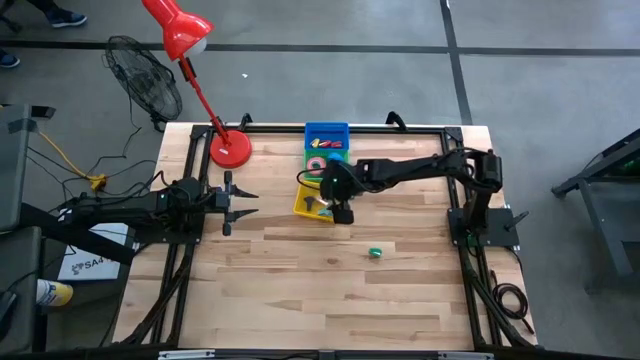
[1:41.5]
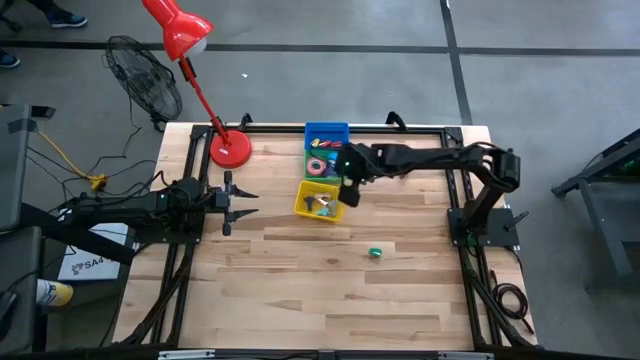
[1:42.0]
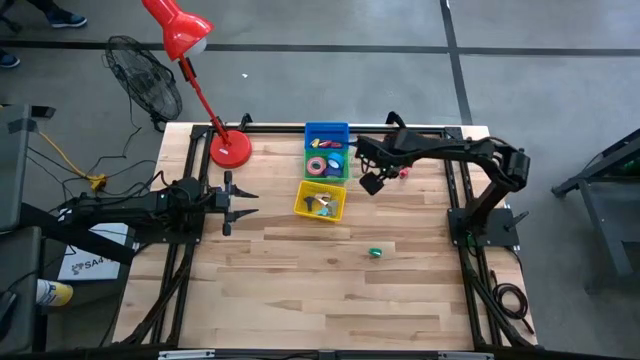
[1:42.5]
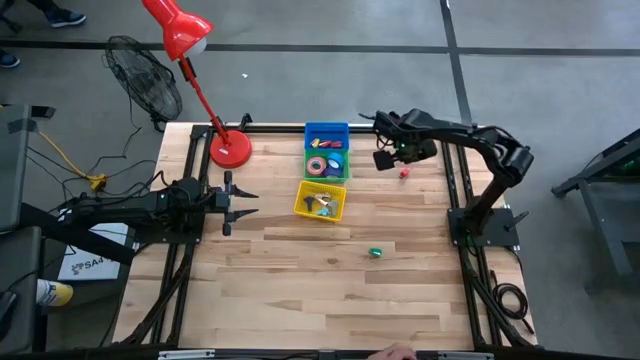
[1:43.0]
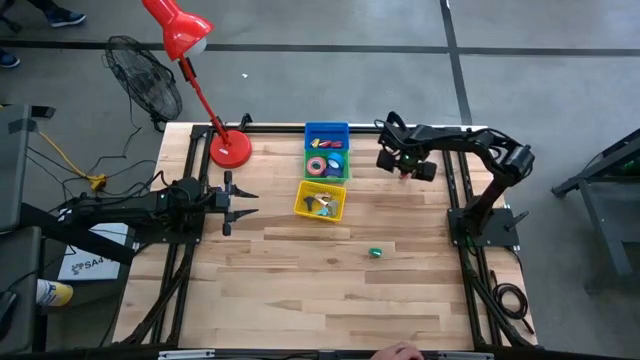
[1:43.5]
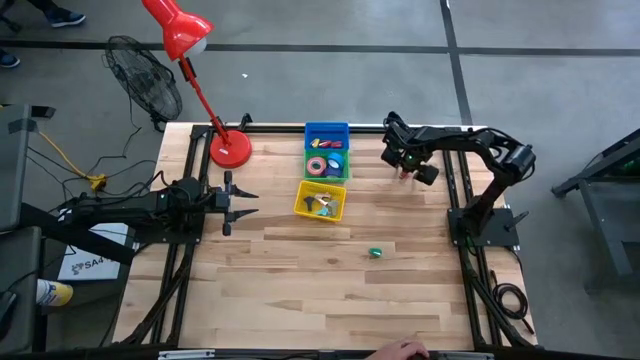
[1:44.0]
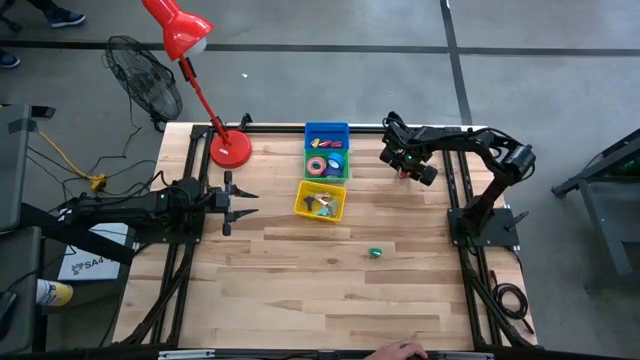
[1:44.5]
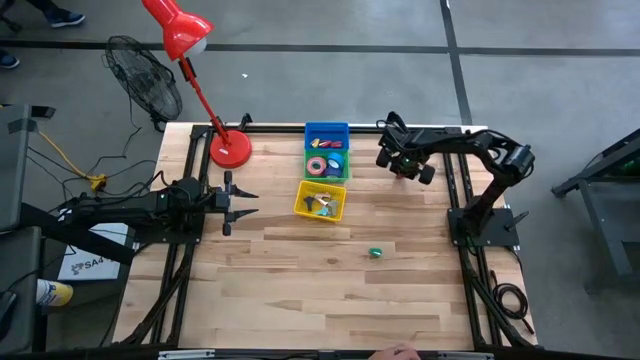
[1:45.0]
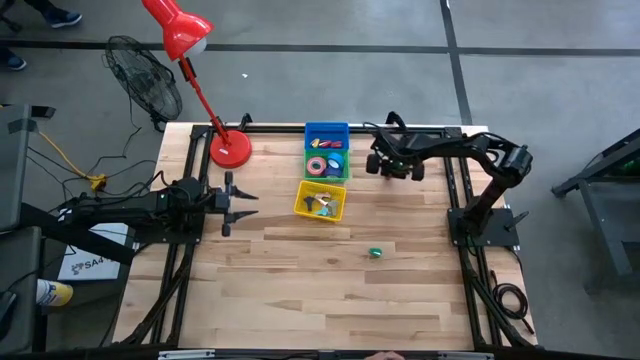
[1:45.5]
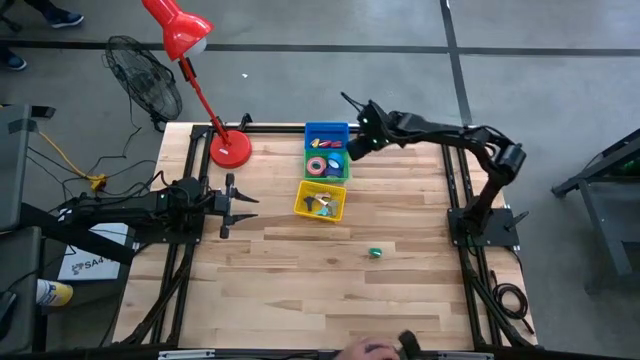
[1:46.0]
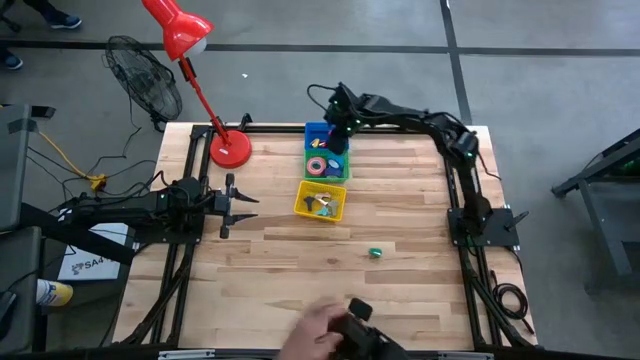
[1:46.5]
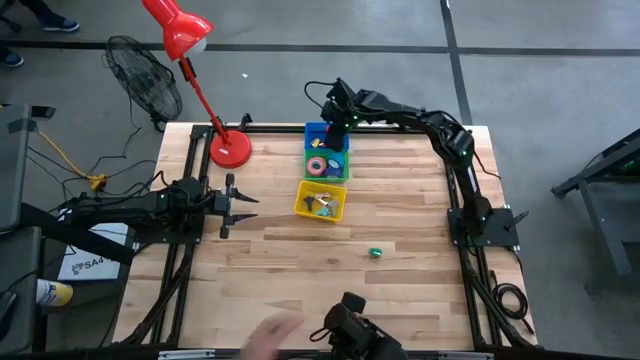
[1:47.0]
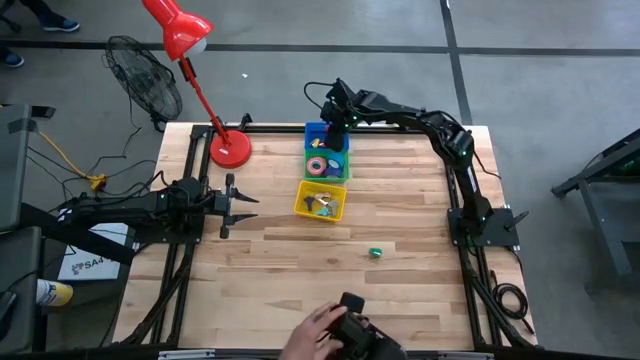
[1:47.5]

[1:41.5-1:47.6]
Task: Pick and place Stapler, Stapler remover, tape
Put the red stapler into the blue bin

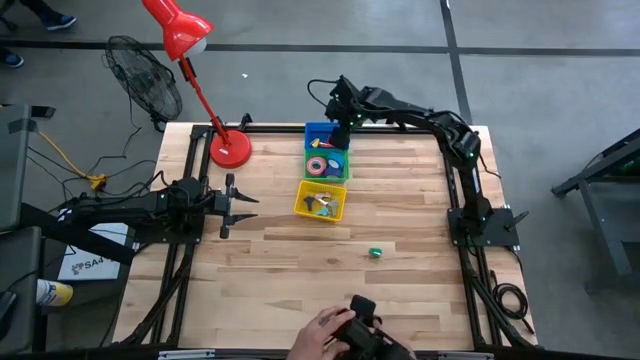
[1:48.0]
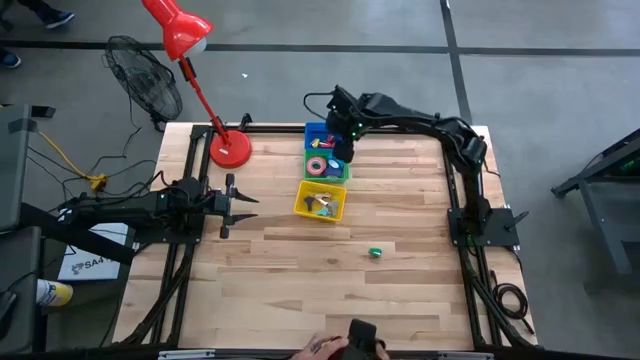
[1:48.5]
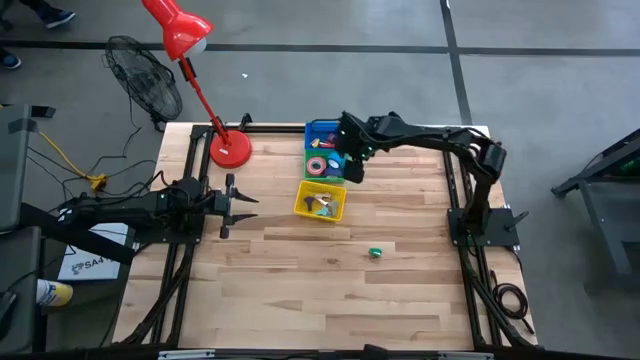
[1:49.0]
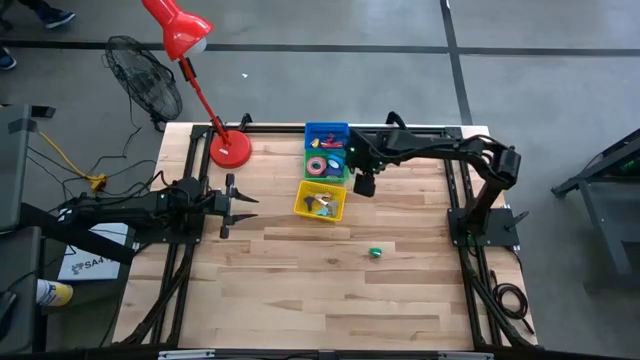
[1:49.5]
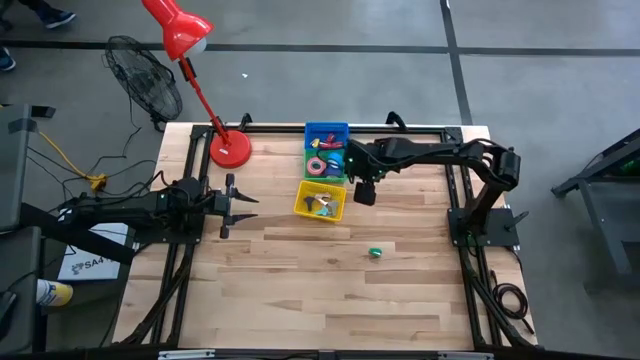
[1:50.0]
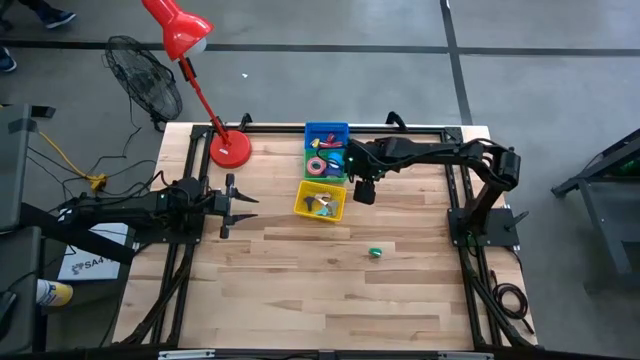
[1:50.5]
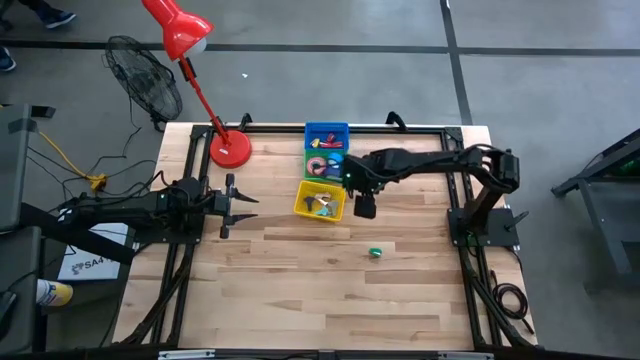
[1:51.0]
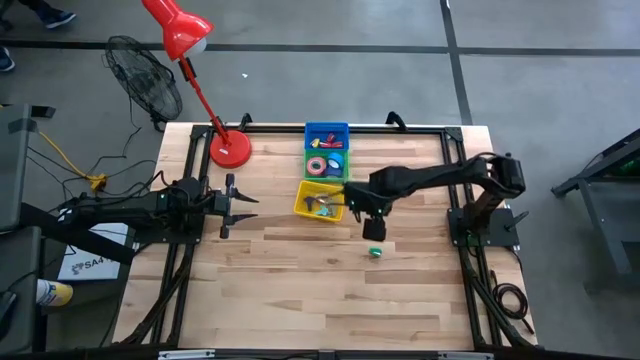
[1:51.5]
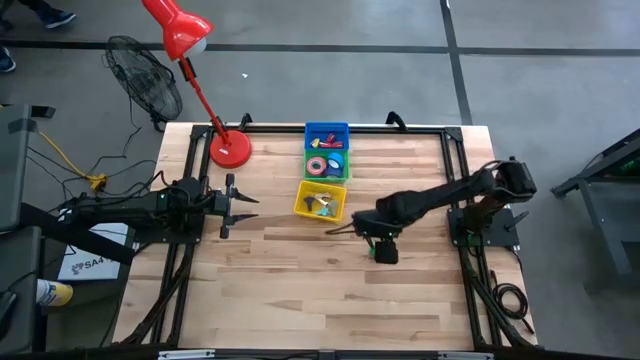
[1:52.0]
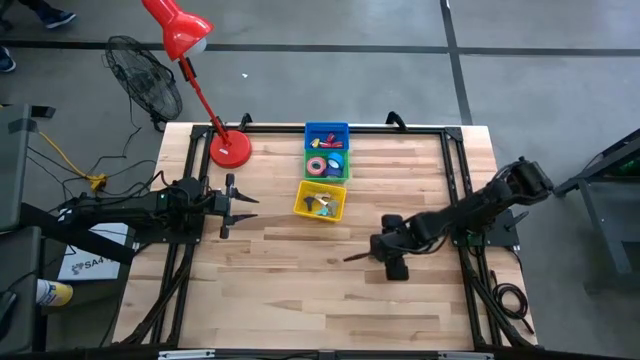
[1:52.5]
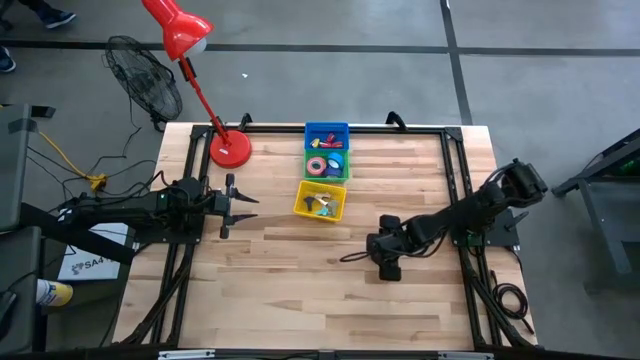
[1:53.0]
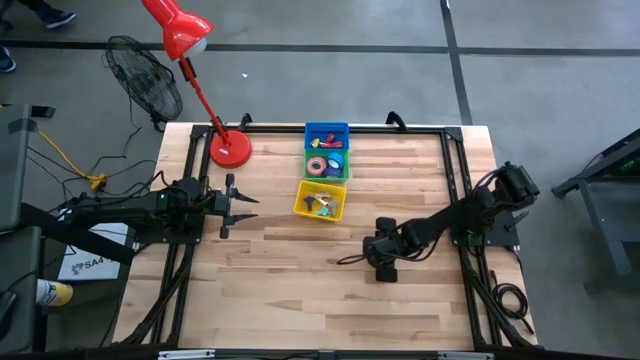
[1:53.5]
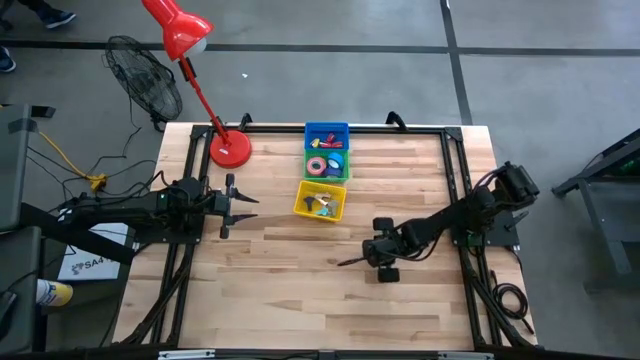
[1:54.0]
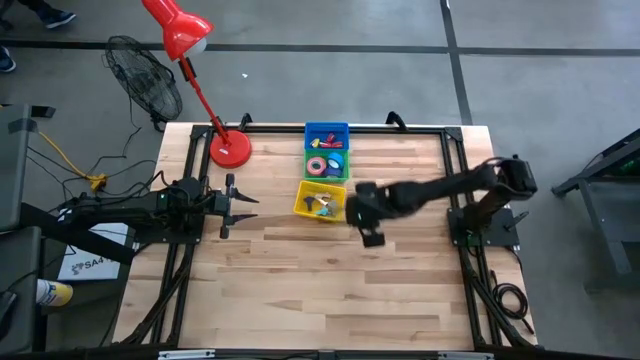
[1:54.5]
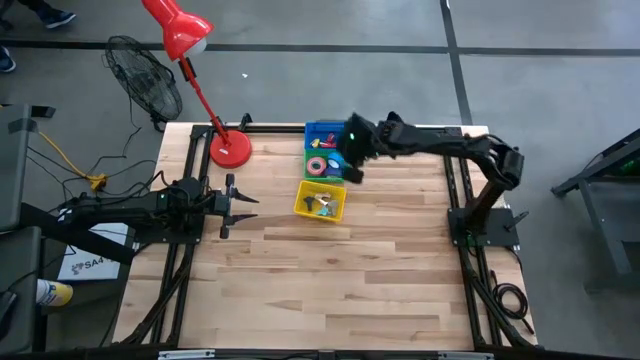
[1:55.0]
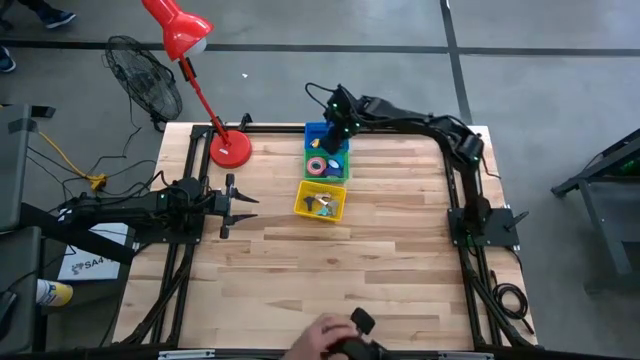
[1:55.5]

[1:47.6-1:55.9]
Put the green stapler into the blue bin

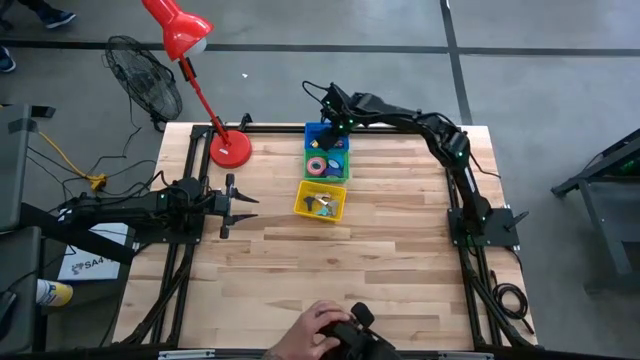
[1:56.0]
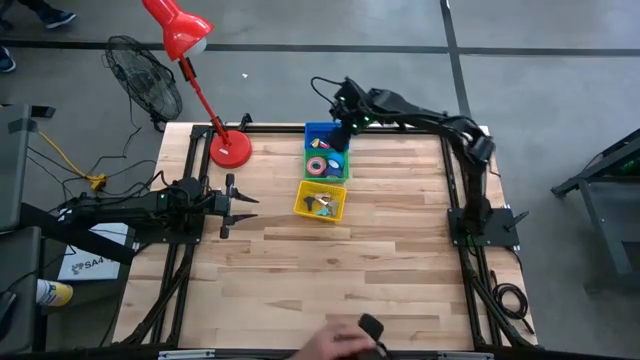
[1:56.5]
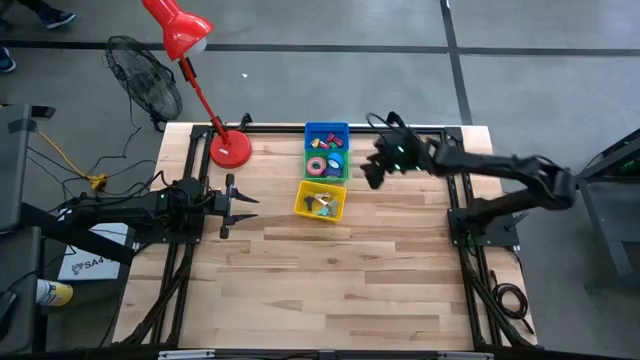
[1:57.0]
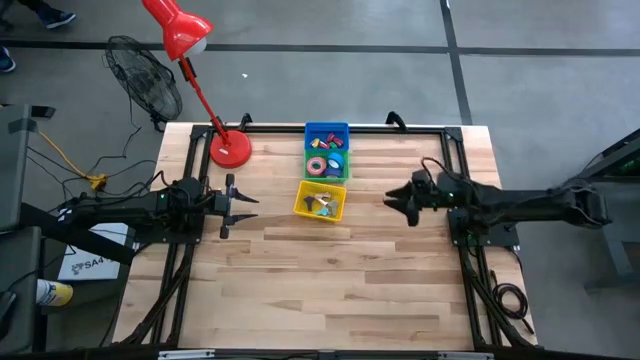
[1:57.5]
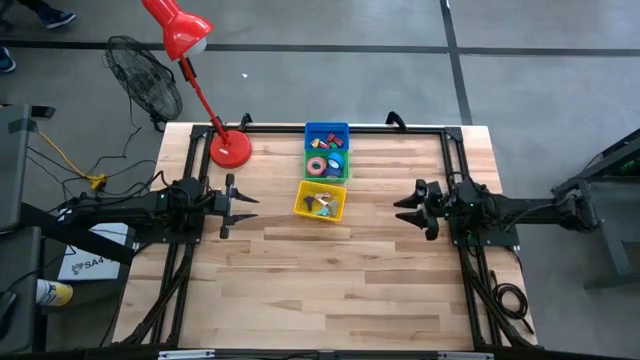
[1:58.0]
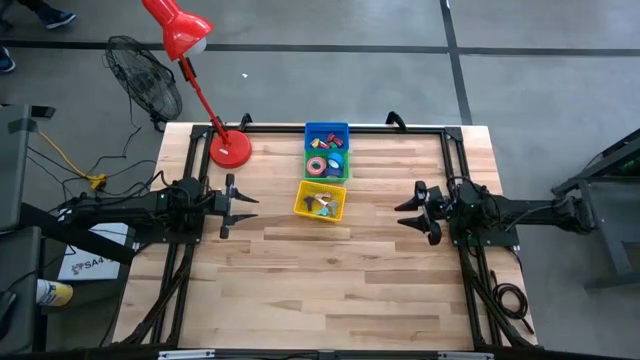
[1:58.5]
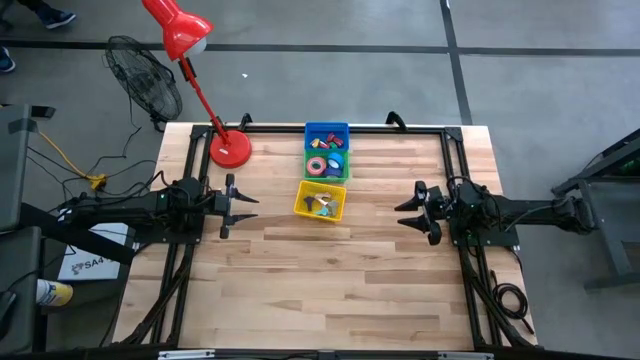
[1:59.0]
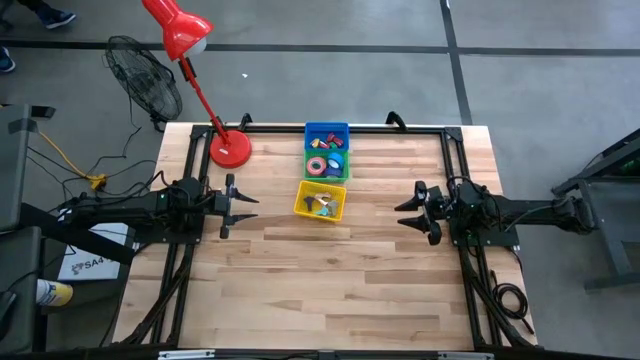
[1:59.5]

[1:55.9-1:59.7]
Return To Home Position

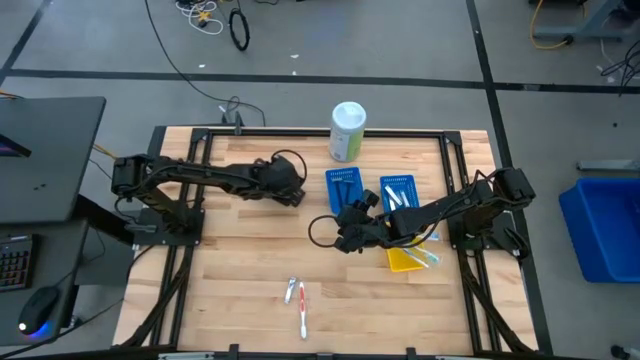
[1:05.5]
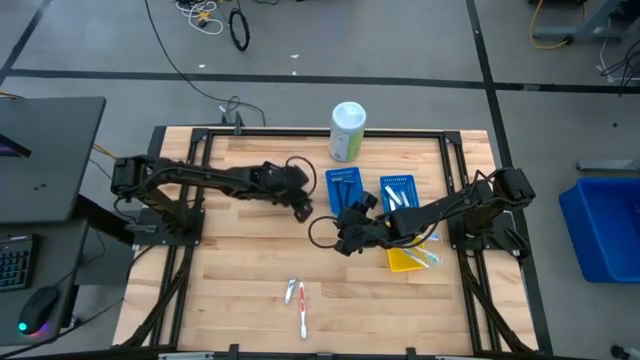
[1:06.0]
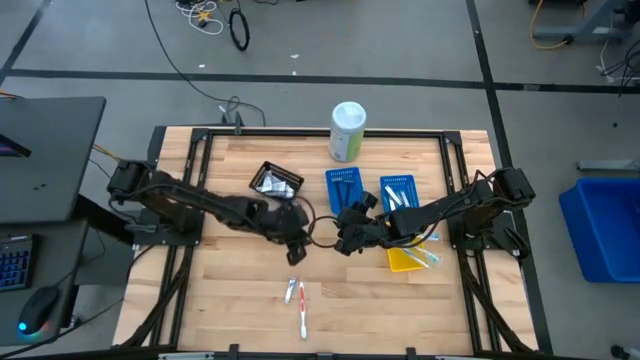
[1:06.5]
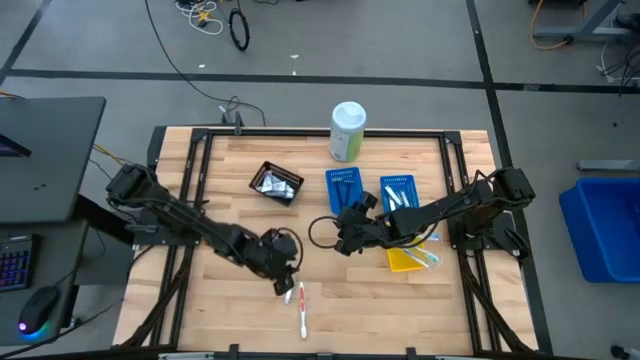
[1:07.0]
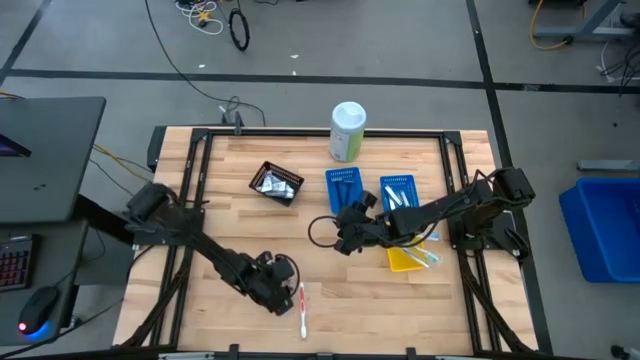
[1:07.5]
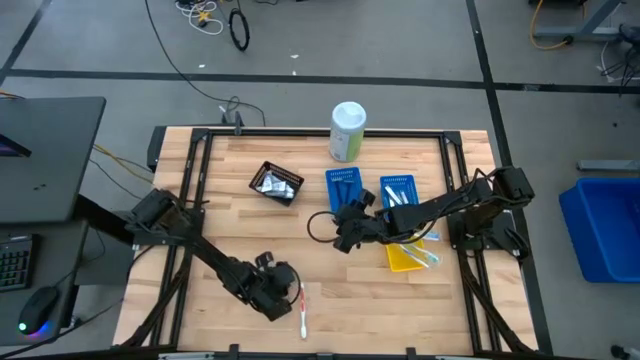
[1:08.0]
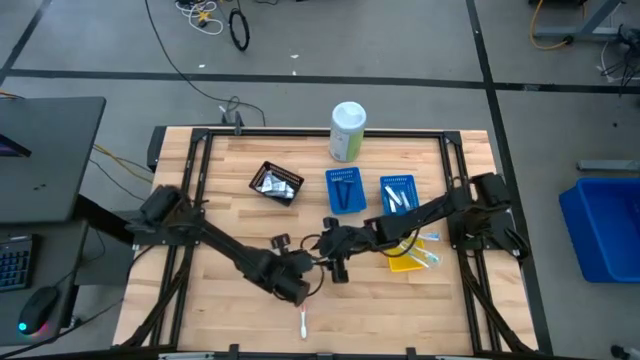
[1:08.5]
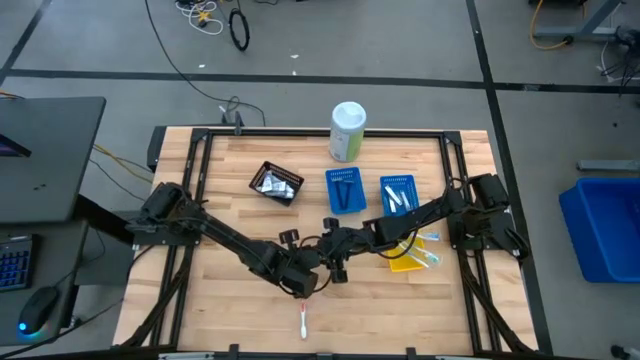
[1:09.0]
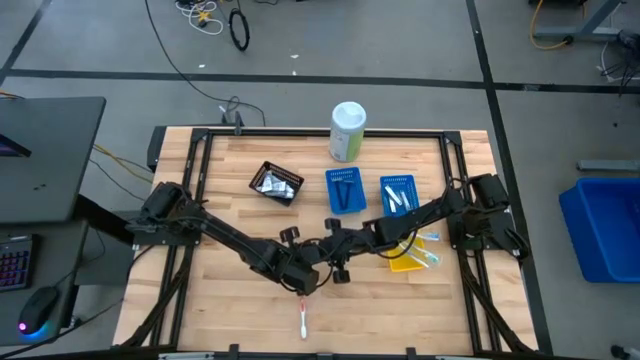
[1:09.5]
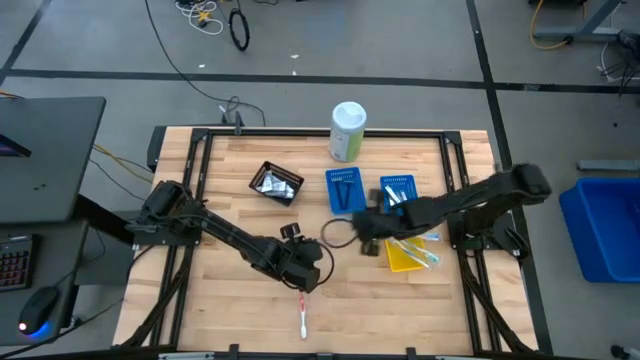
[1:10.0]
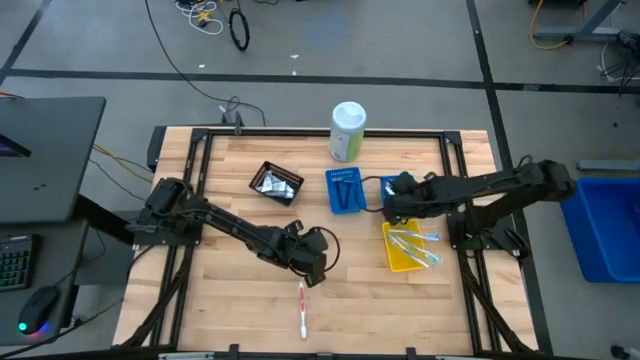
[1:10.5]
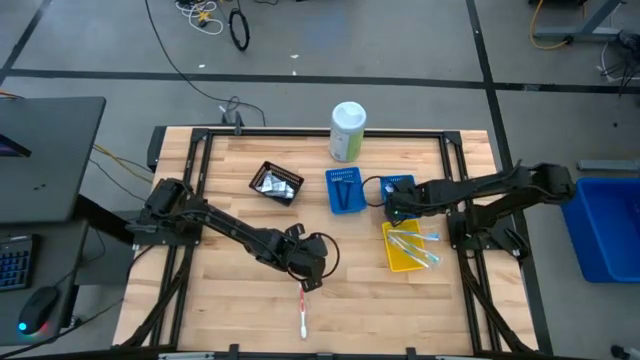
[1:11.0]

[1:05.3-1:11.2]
Task: Pick & Place Travel size toiletries
Put the nail cutter into the right blue basket
